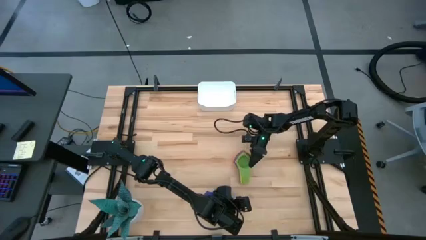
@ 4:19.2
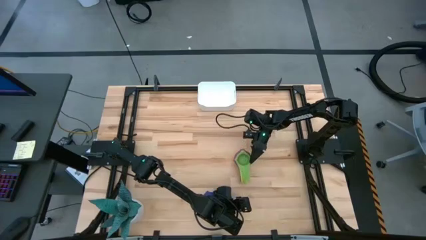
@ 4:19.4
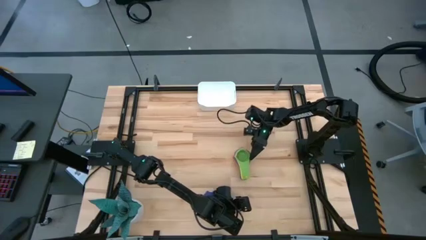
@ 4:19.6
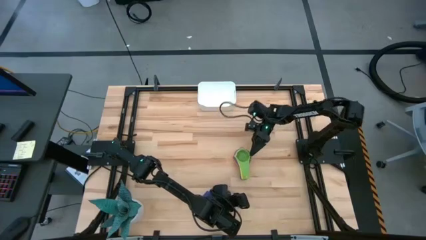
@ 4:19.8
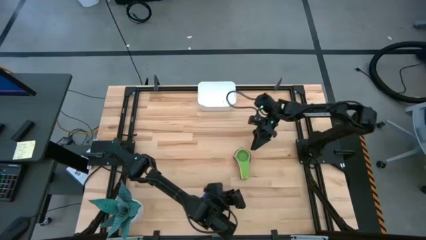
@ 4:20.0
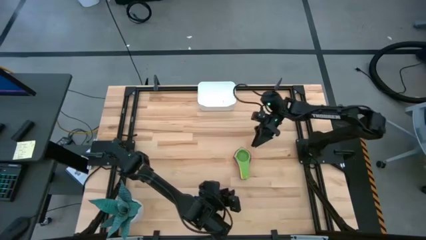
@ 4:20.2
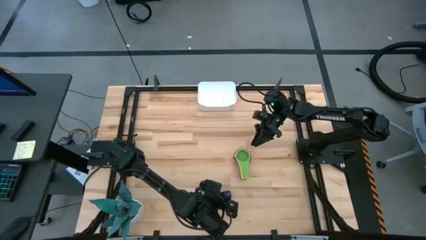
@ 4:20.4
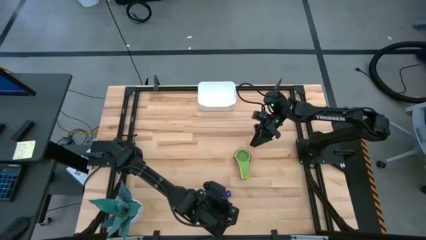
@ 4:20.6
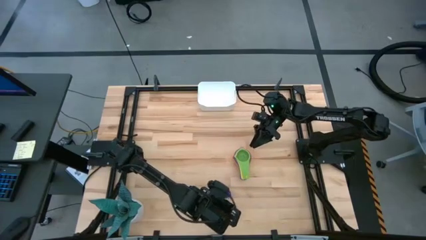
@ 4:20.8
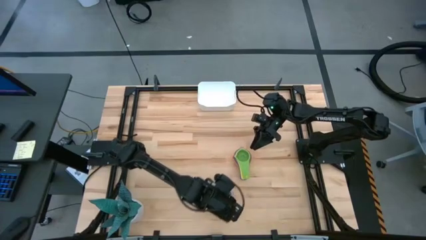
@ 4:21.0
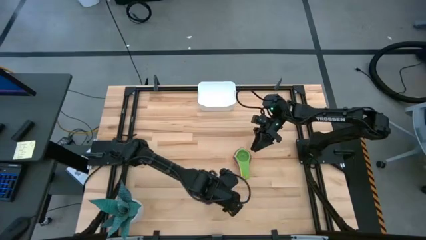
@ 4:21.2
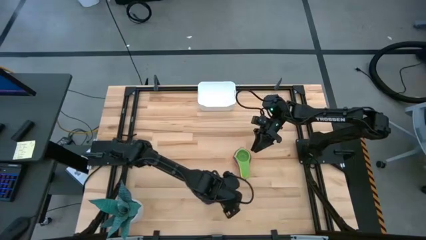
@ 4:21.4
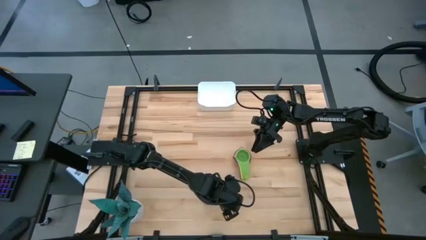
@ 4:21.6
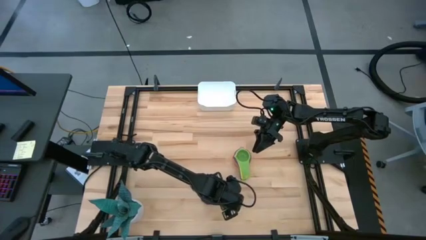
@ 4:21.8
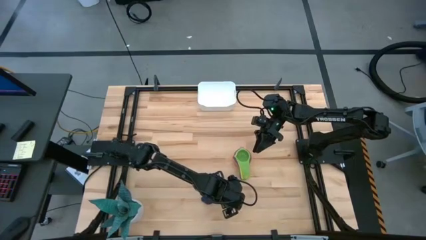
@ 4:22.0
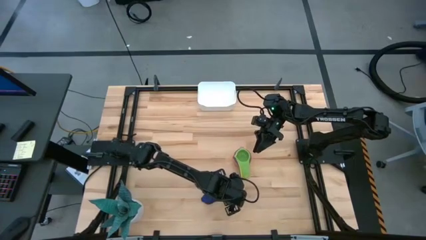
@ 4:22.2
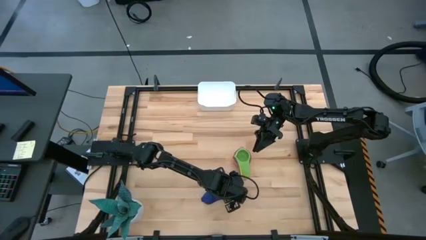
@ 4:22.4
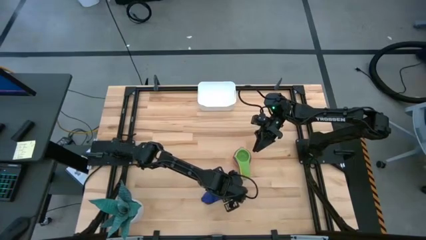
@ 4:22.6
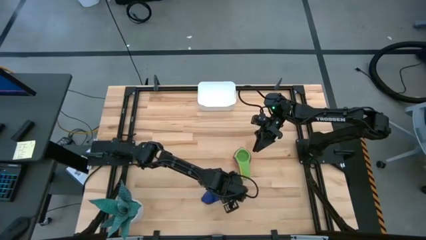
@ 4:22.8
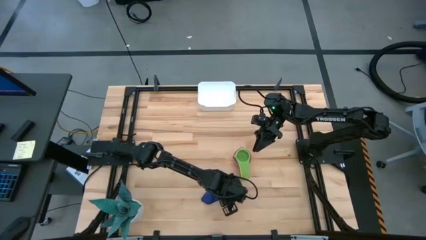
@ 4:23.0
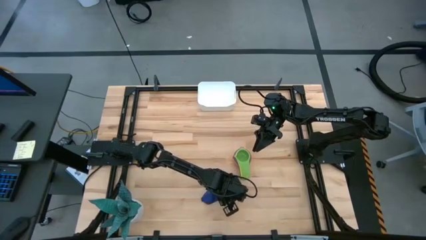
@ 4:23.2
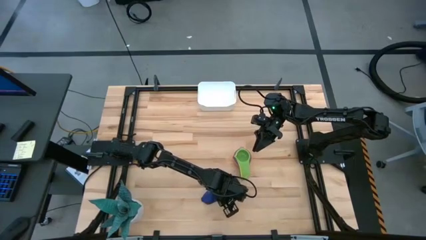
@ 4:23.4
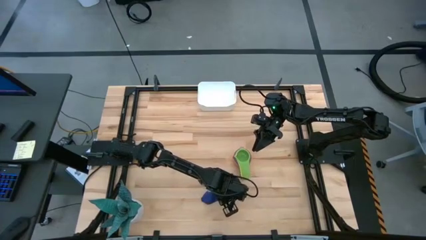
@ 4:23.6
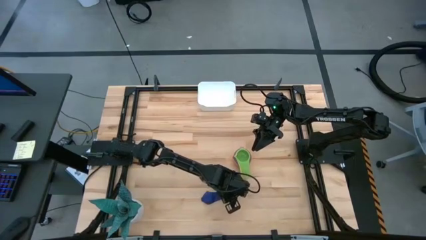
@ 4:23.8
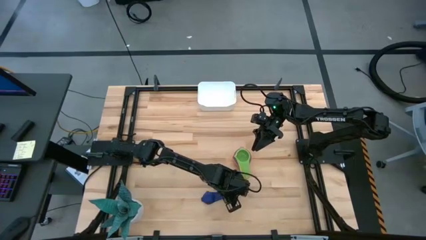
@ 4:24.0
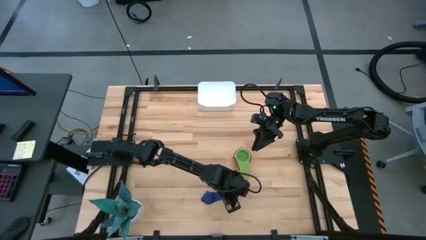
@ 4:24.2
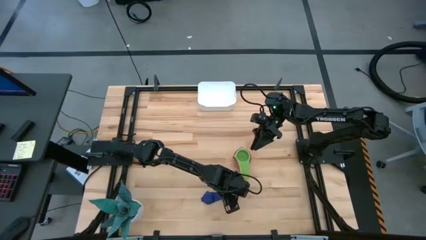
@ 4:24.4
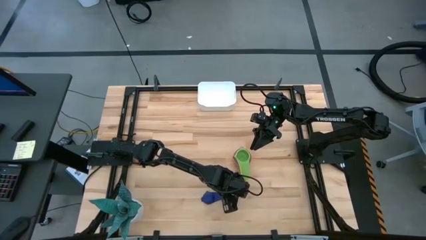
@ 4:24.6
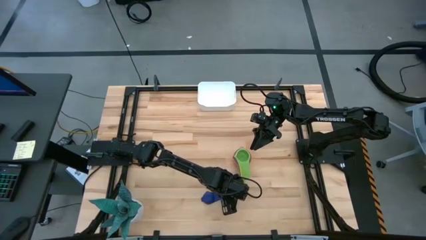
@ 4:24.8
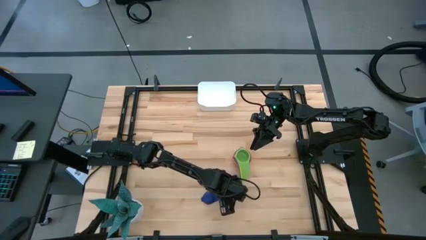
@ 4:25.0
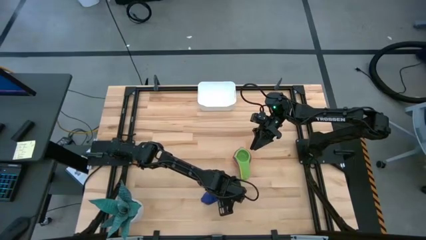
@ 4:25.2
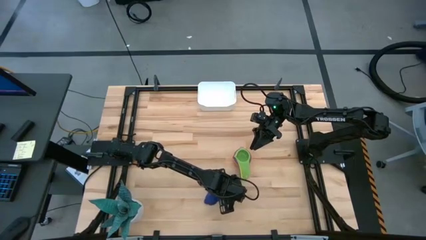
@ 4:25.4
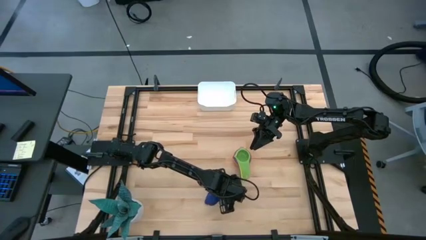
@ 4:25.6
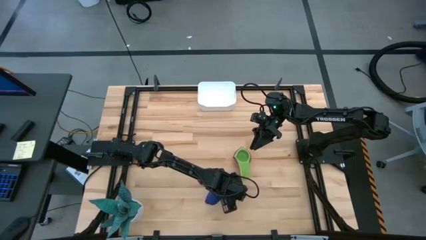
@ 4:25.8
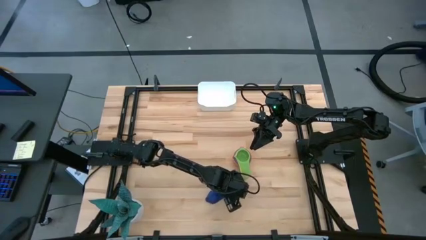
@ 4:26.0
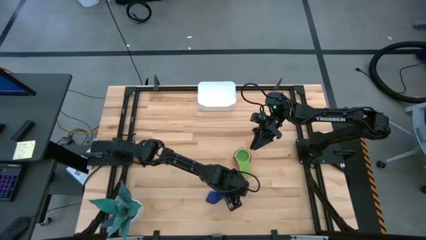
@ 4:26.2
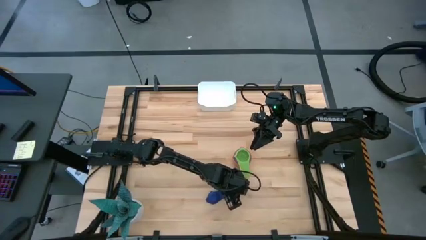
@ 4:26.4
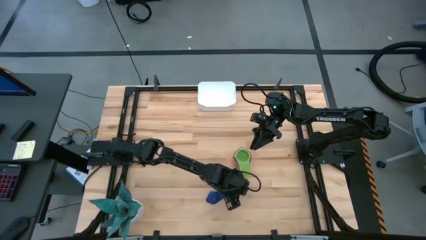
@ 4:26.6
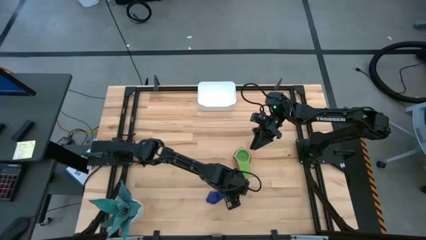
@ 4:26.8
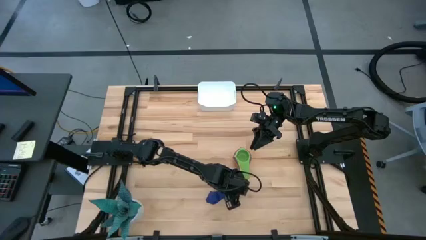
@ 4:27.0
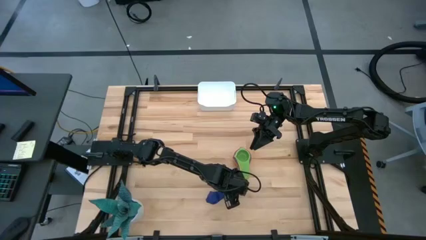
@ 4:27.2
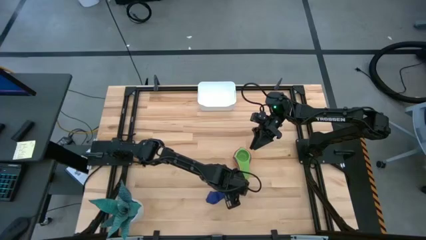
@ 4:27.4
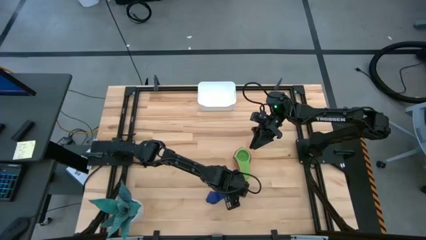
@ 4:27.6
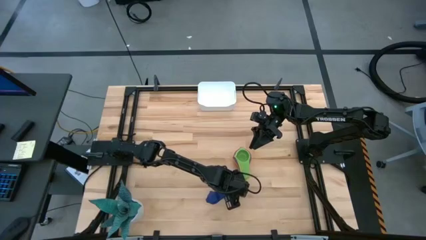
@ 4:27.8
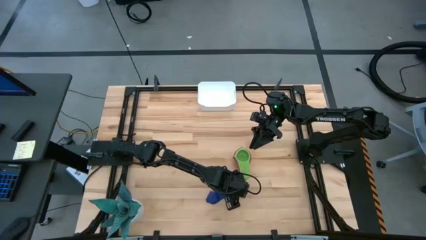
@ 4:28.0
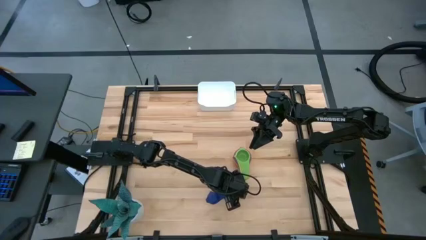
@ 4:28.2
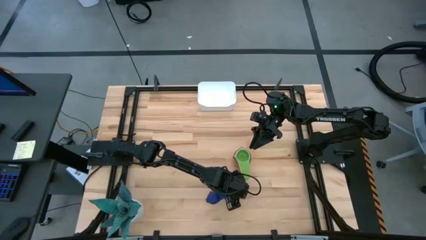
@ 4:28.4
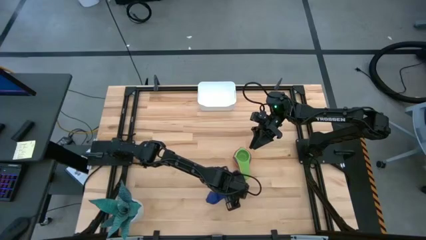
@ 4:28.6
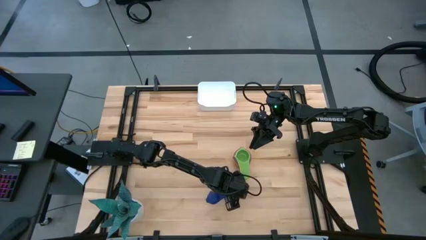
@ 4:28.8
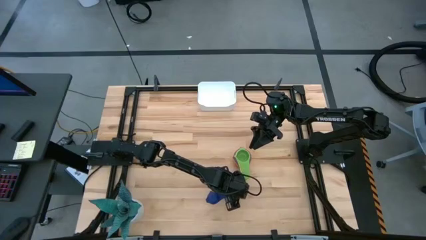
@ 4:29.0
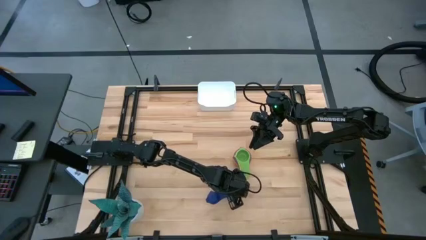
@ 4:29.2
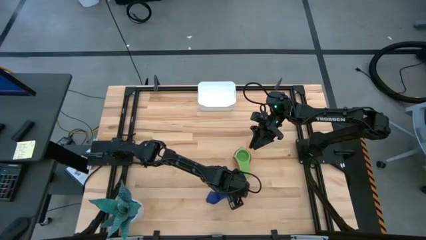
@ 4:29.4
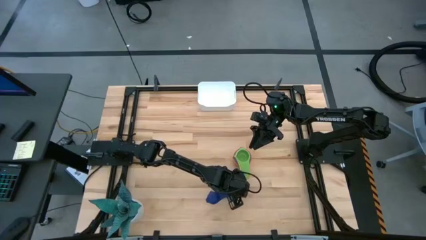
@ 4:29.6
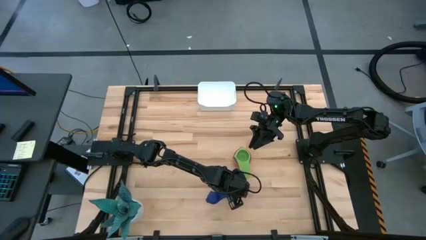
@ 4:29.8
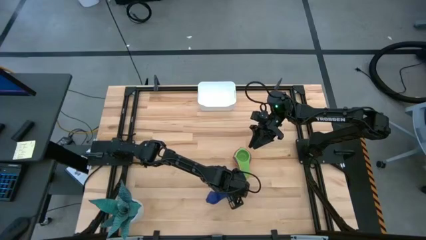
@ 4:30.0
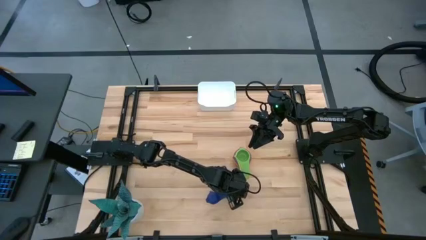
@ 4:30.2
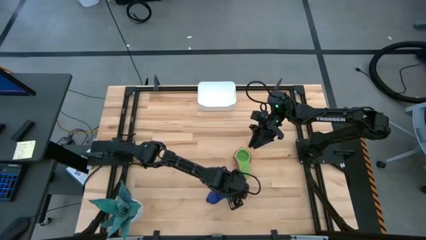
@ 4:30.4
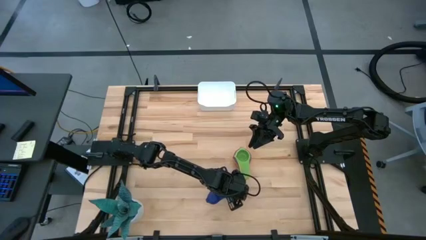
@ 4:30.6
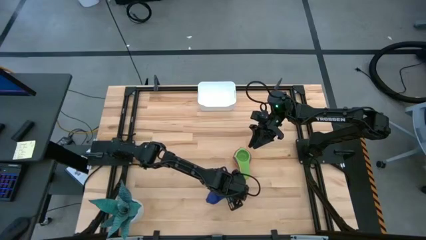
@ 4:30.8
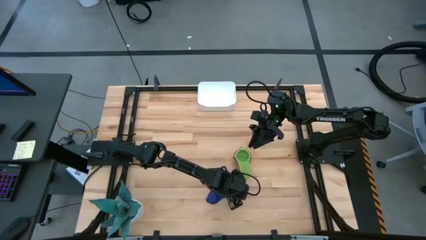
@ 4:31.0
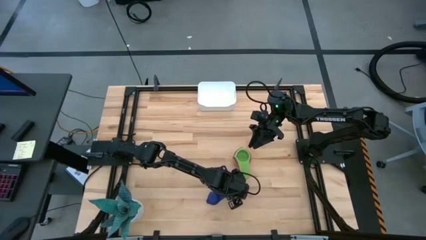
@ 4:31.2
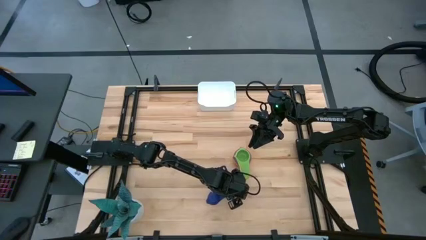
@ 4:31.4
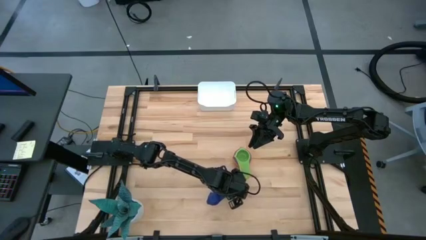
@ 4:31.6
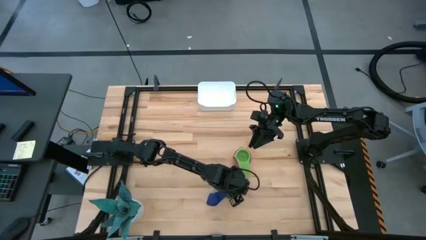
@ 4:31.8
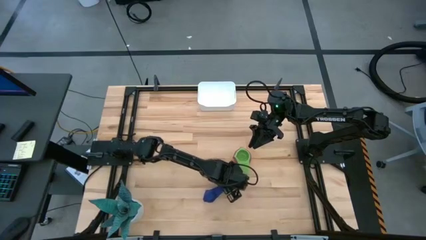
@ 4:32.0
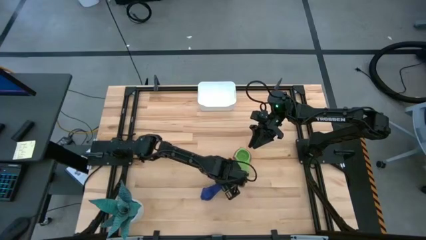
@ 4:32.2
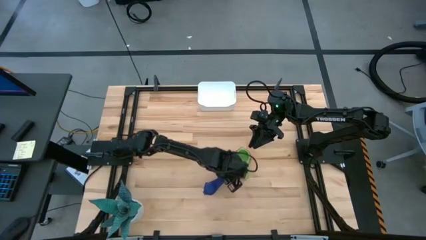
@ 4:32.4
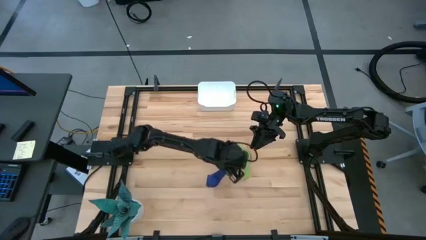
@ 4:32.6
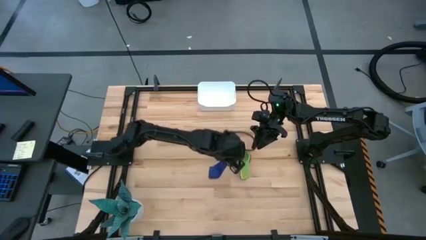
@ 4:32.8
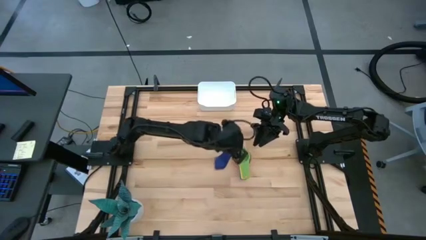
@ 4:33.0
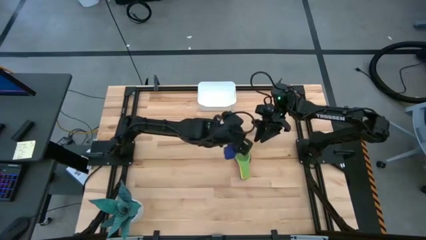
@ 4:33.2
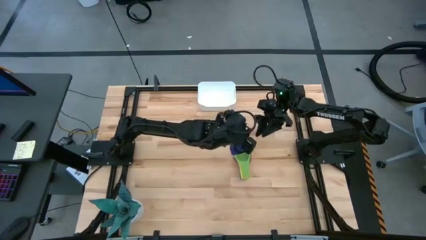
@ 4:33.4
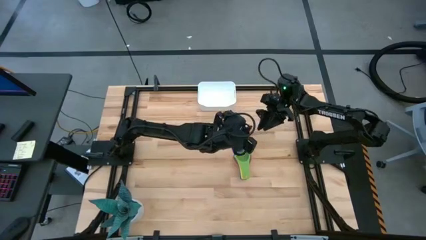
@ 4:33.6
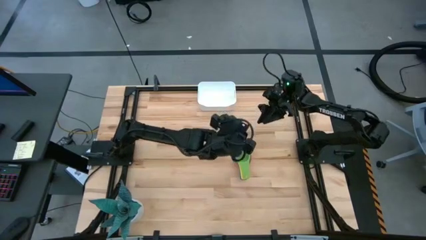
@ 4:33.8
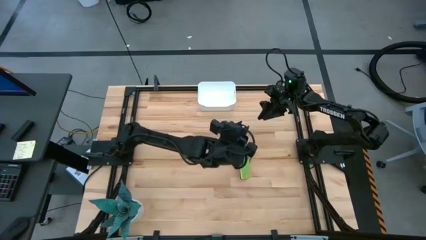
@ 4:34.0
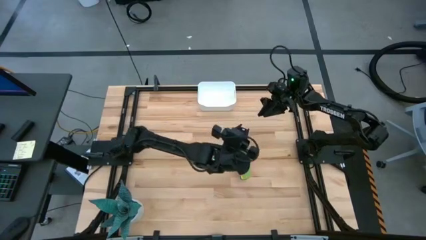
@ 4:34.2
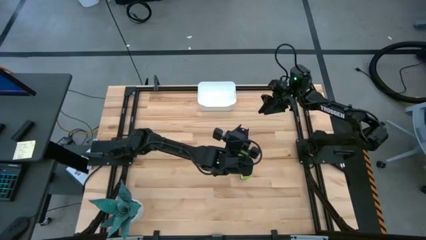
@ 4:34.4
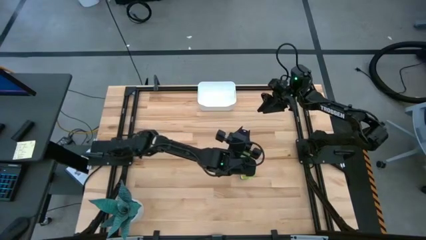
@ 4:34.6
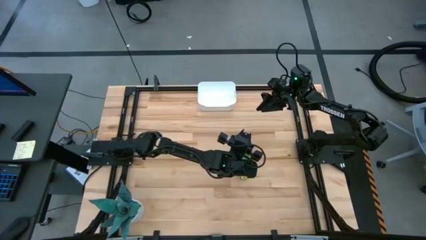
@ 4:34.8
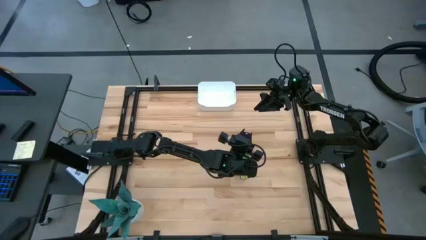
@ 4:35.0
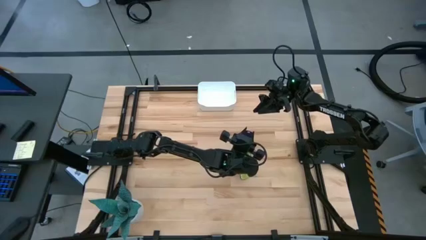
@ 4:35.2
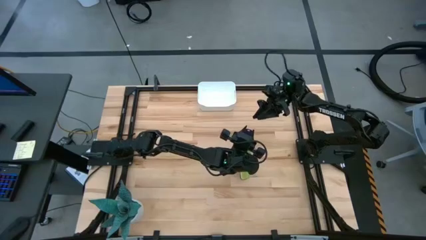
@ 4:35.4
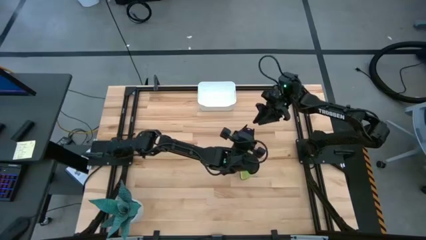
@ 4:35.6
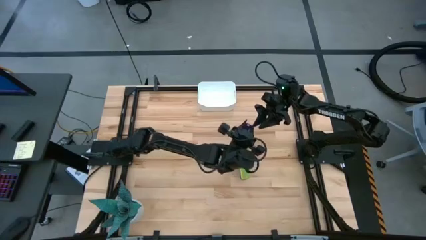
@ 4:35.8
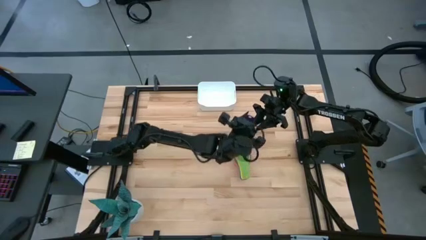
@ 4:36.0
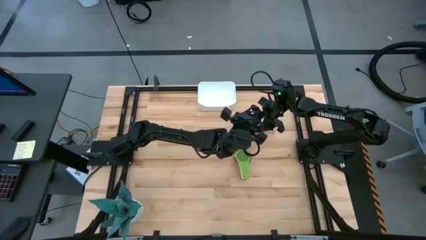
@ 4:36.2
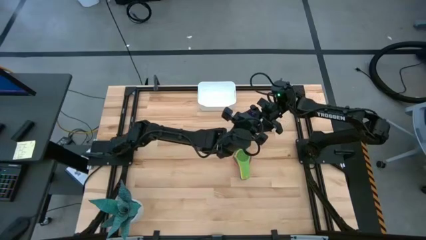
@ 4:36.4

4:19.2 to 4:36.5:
Task: Nest measuring cups in basket
Stack the dark blue measuring cup on top of the green measuring cup
